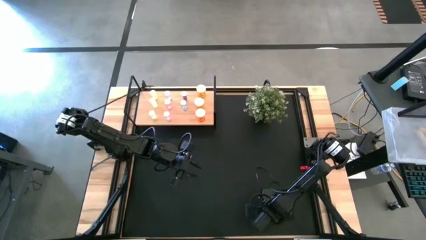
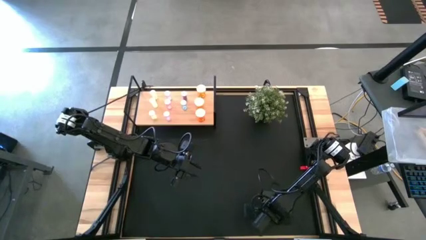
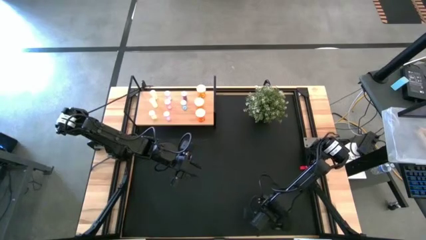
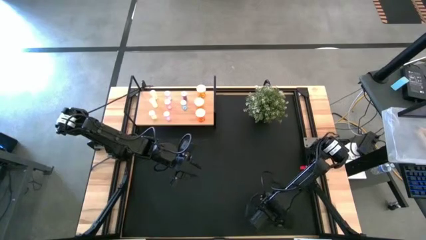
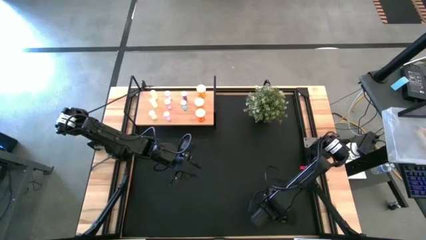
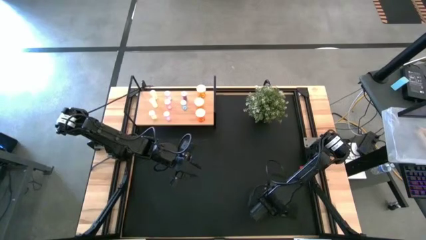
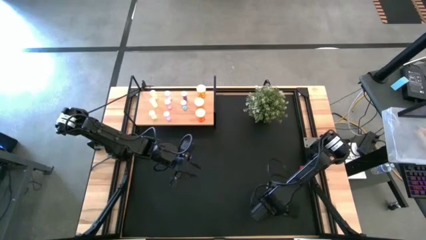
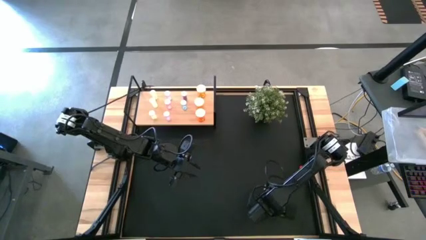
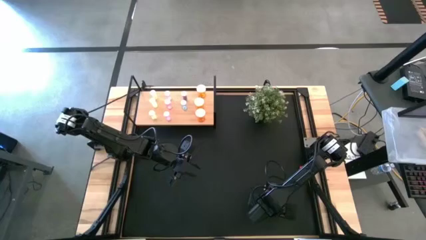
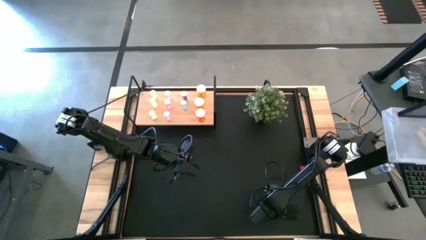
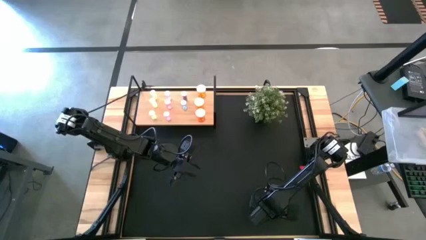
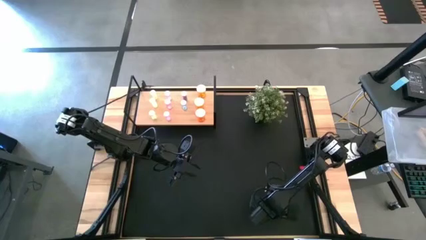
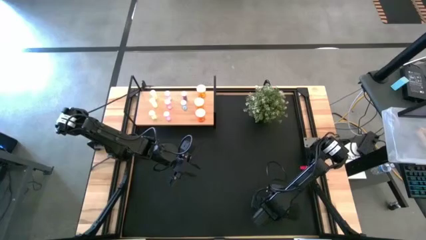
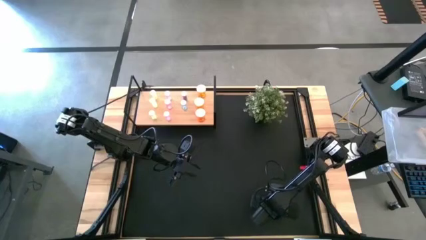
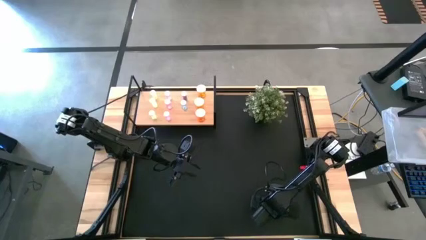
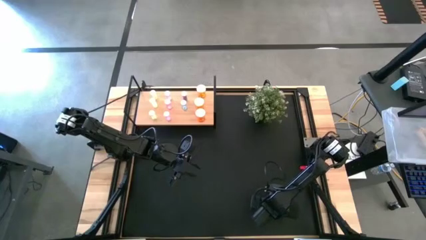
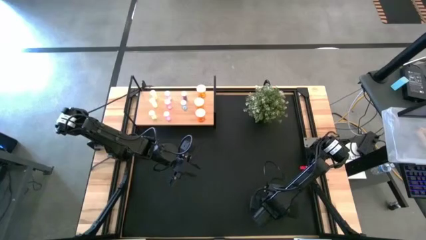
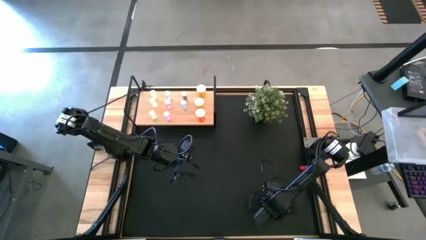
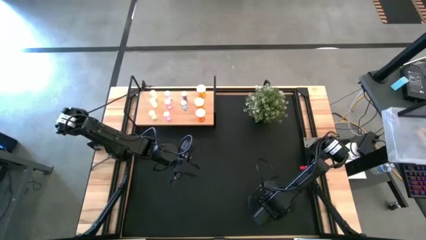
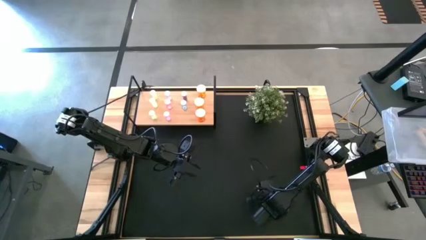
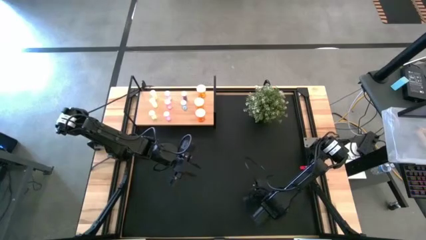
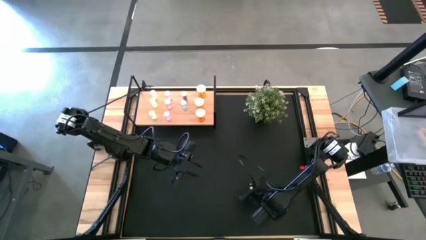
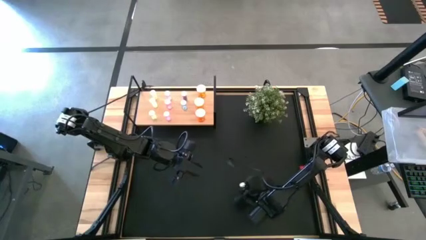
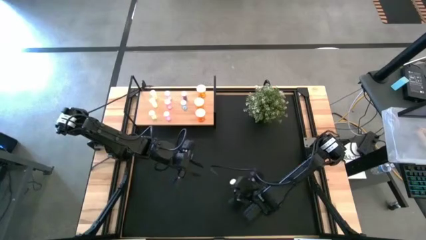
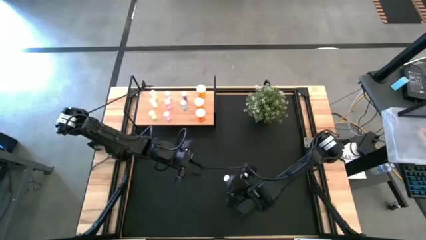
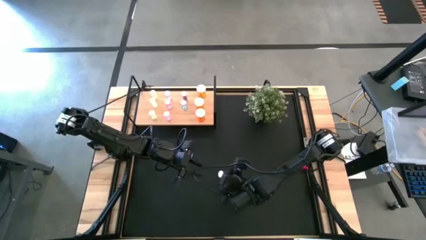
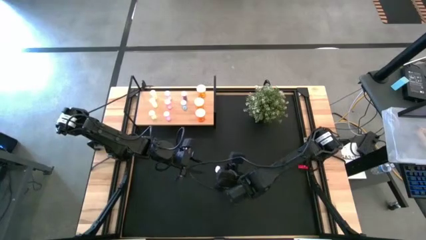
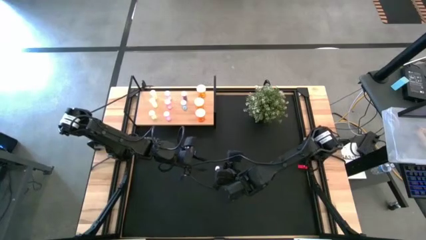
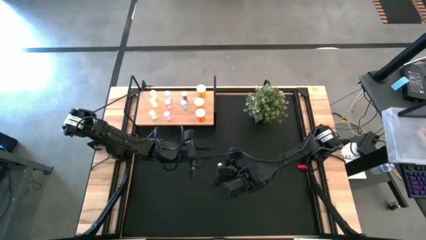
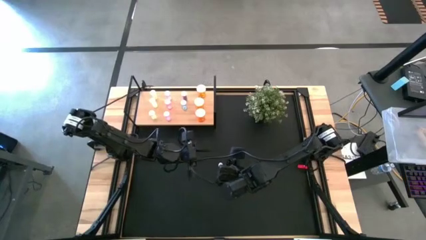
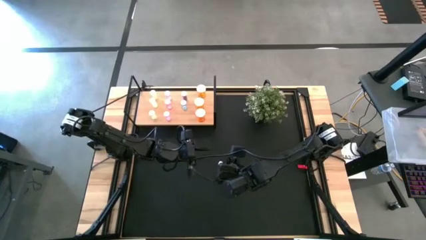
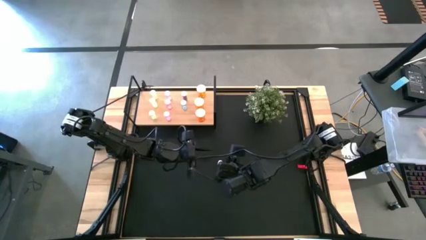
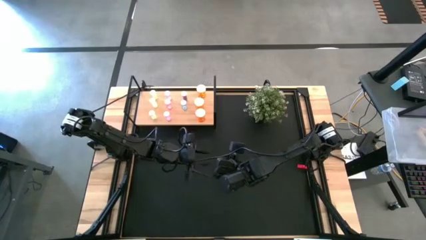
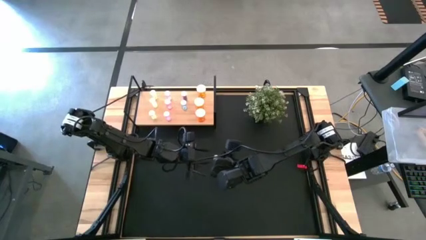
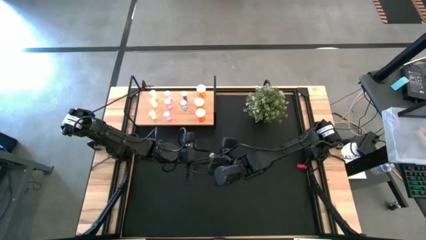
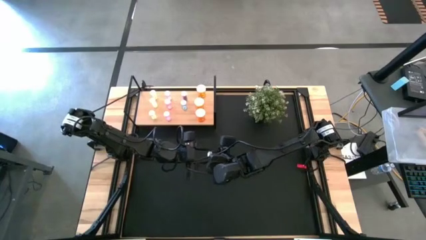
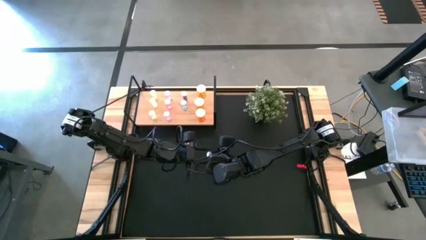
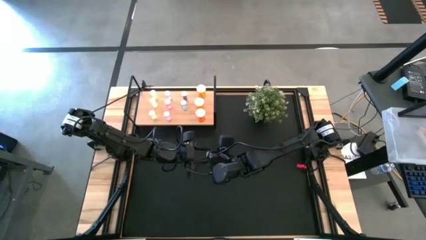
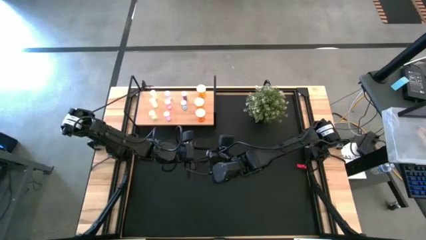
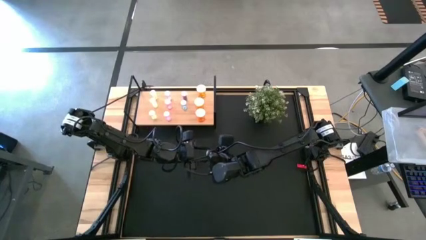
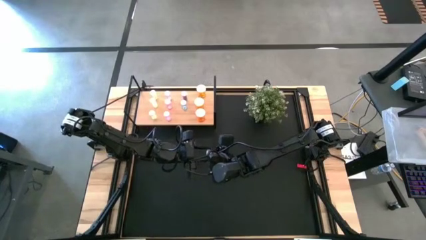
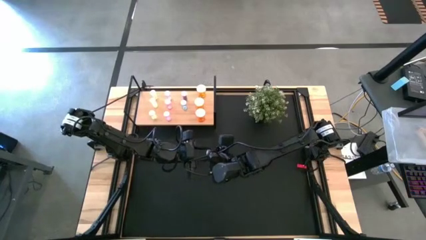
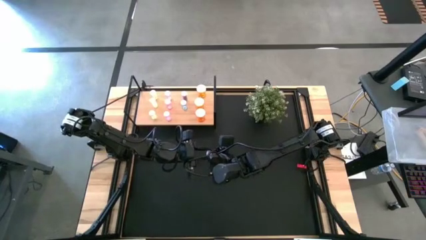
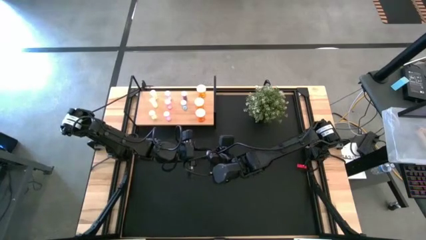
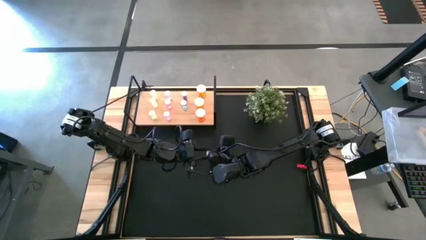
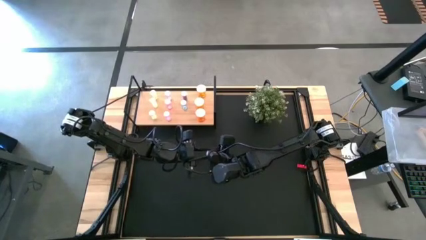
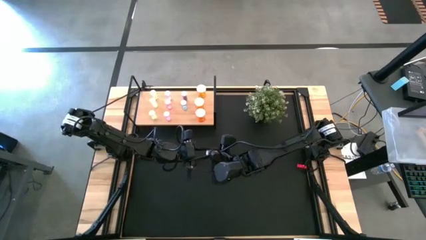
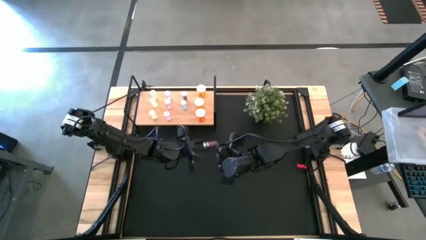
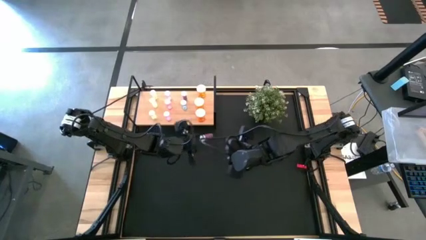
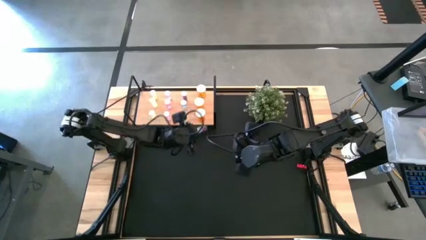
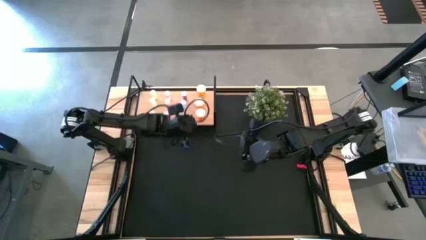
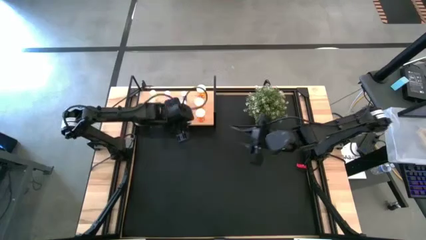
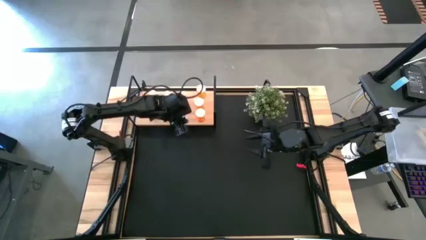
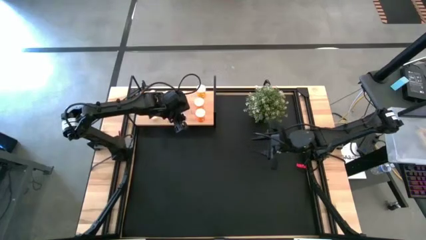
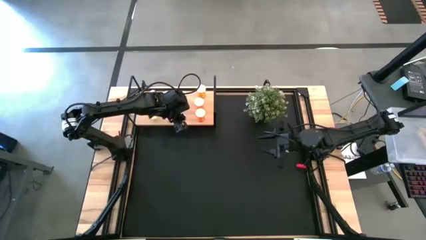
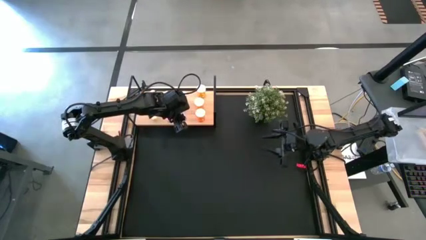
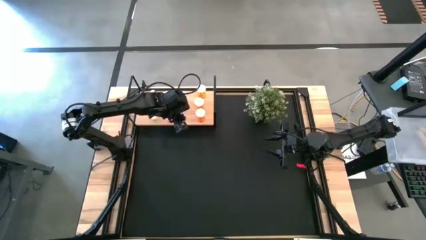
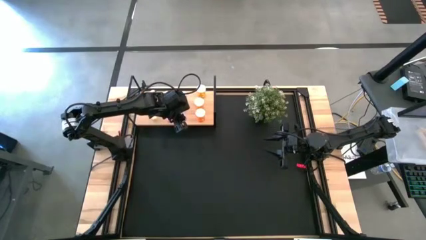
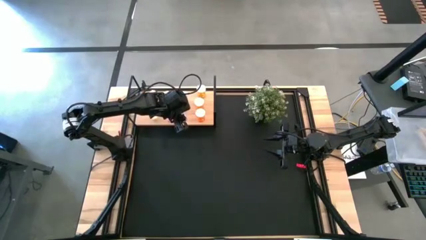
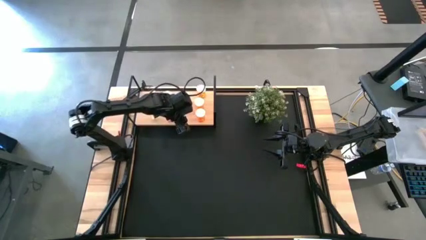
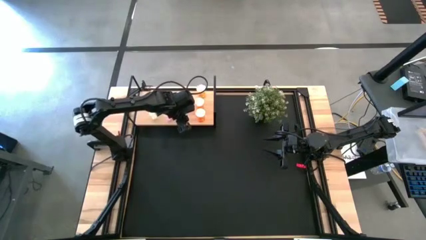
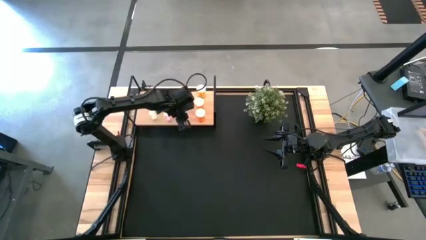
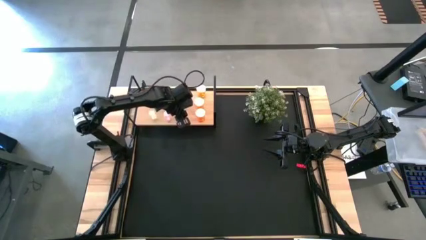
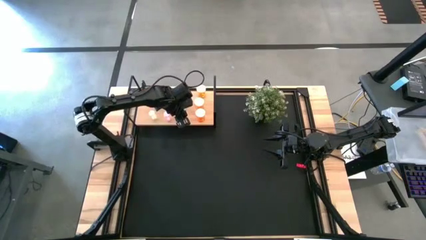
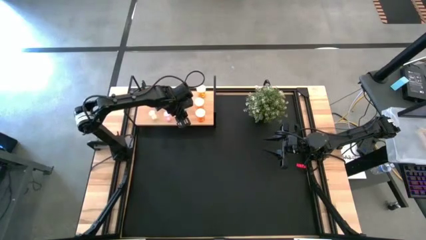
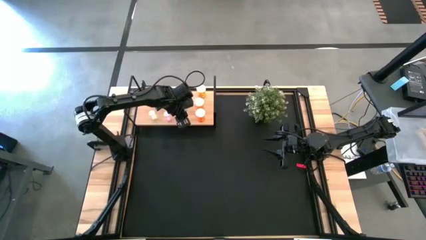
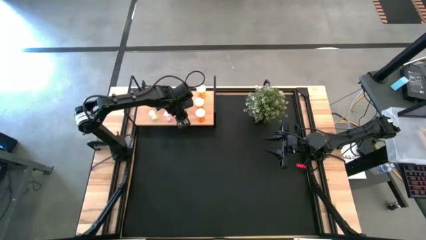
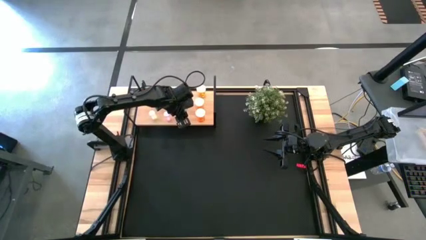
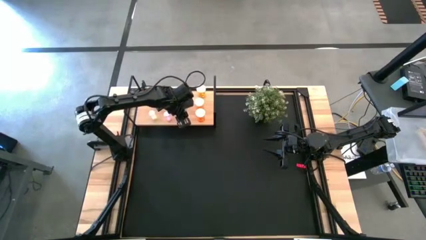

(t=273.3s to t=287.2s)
Task: Pick and place medicine bottles onto shelf by color
Put the blue medicine bottle on the shelf aligned with the other blue medicine bottles

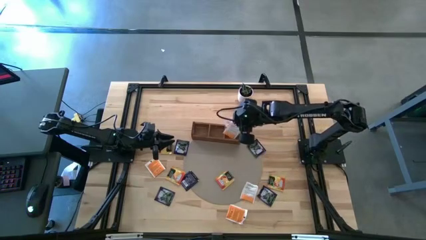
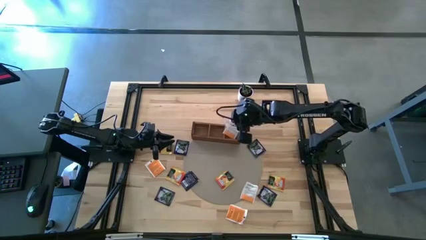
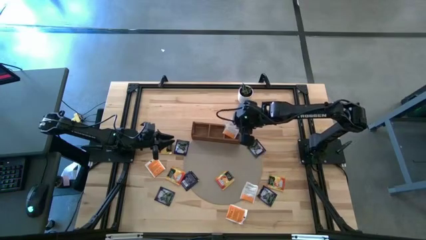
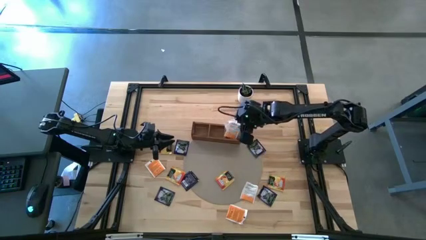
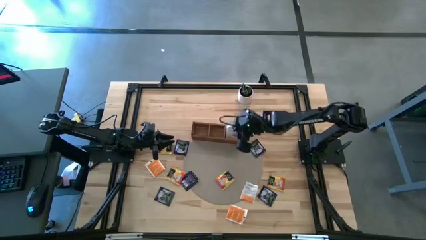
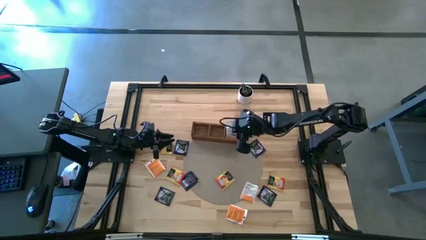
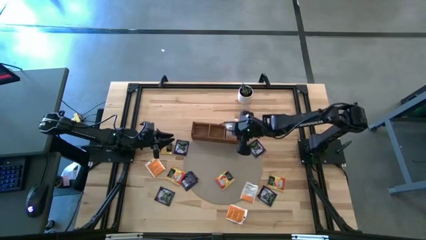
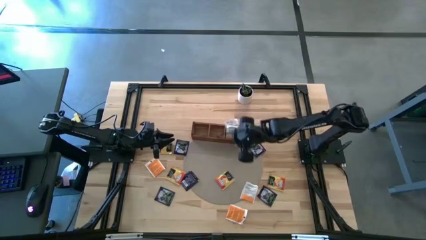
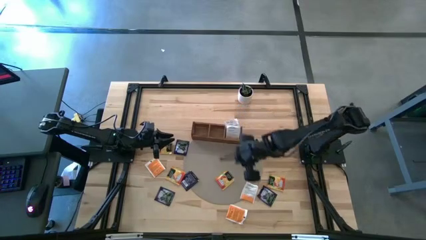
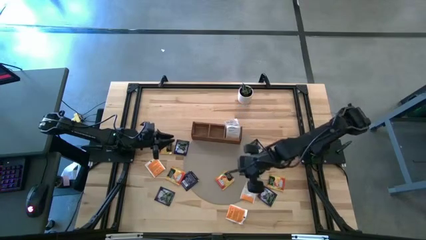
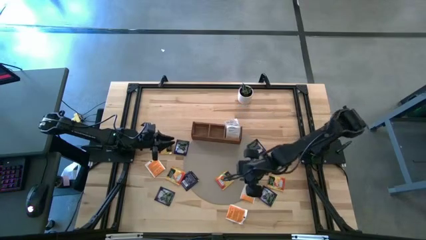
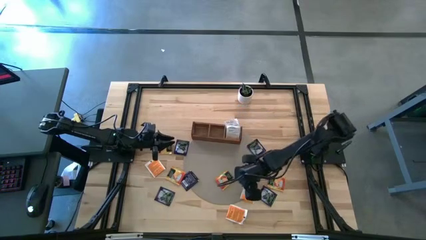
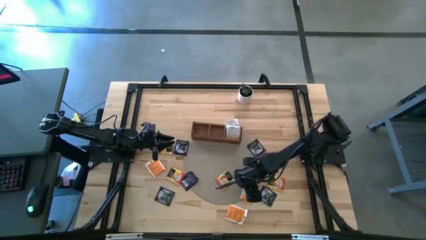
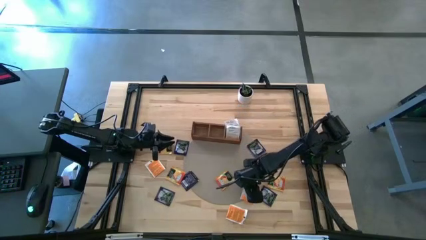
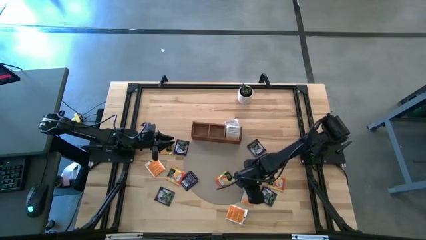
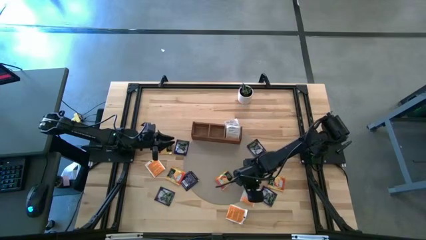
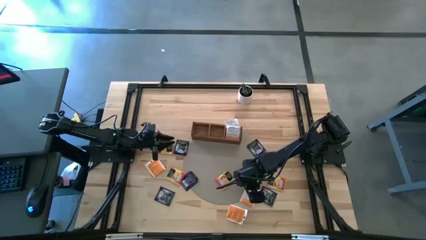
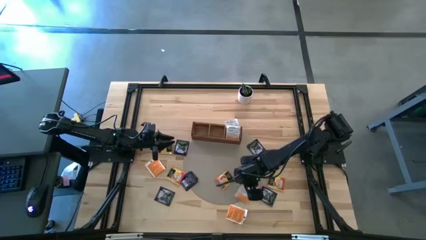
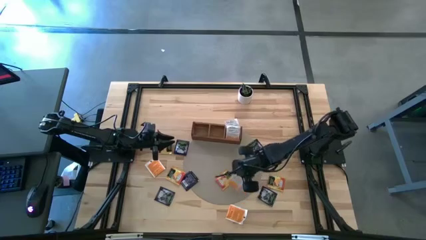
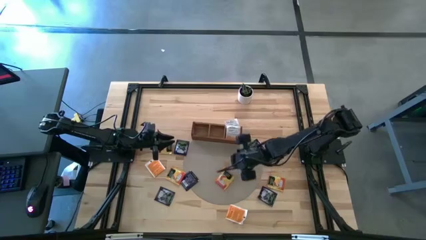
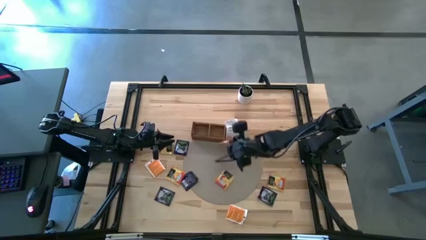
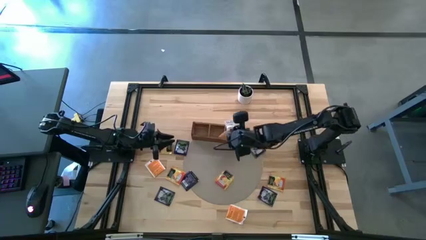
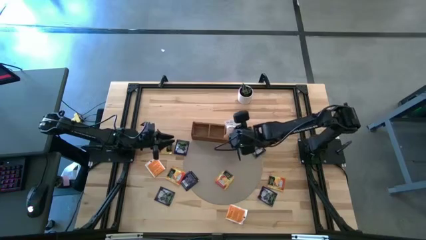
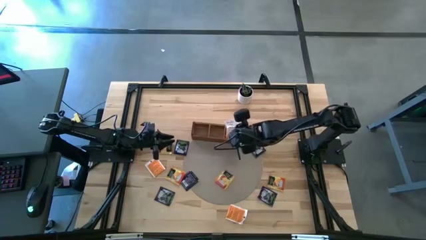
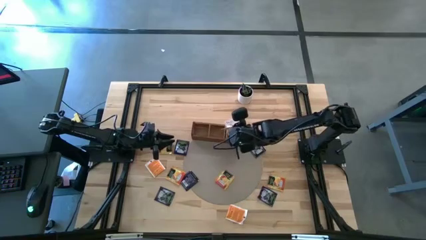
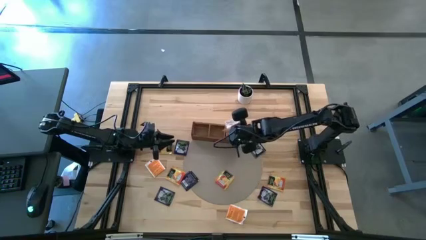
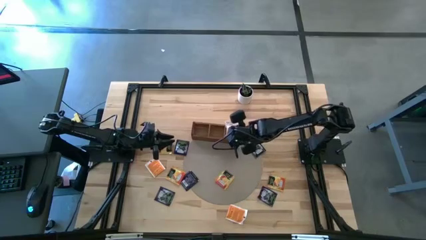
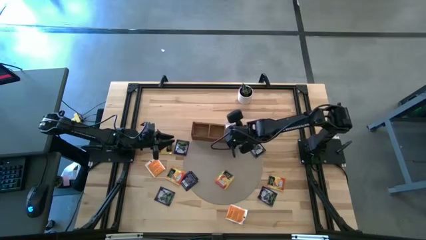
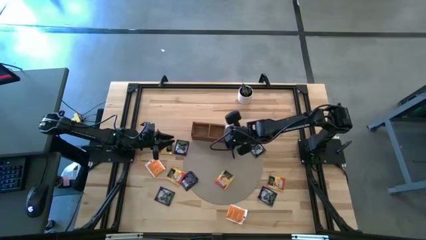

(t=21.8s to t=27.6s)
Task: Pick & Place Tea
Put the white tea bag into the right section of the wooden organizer
